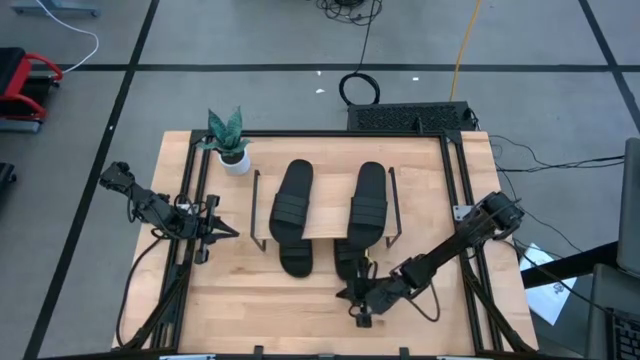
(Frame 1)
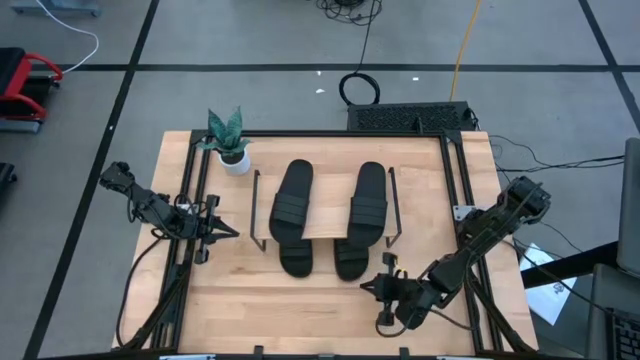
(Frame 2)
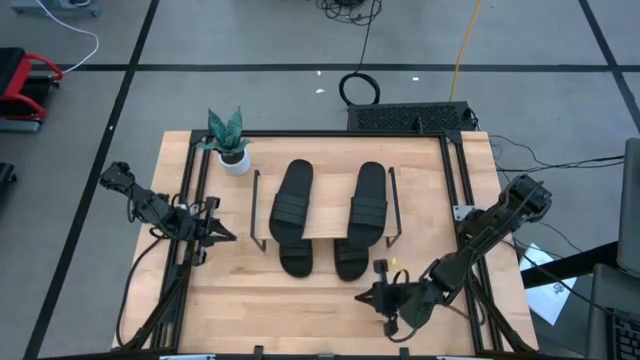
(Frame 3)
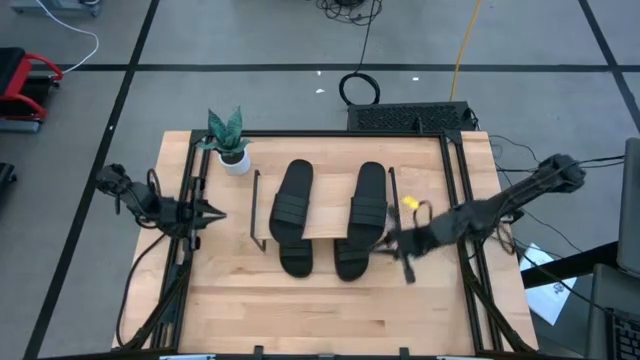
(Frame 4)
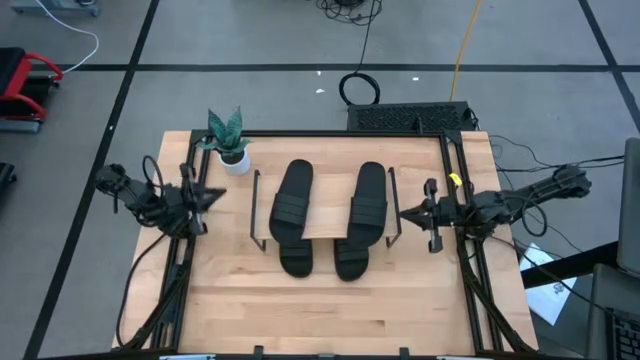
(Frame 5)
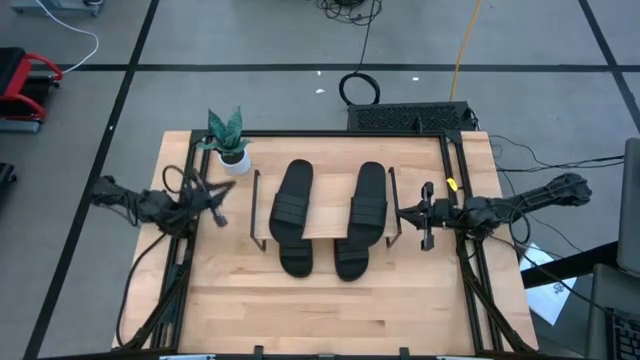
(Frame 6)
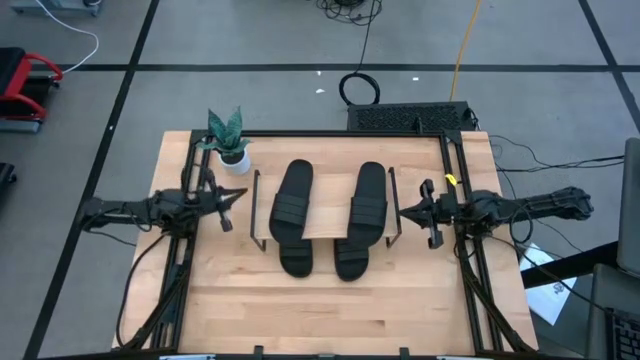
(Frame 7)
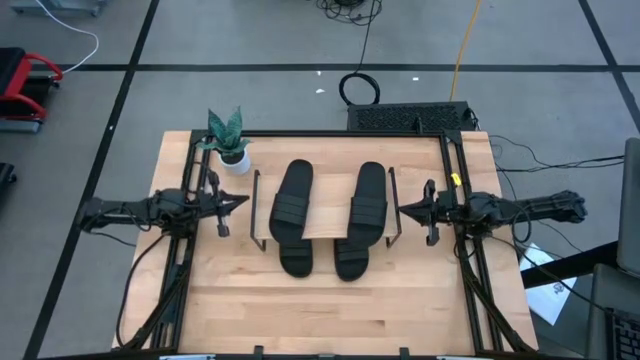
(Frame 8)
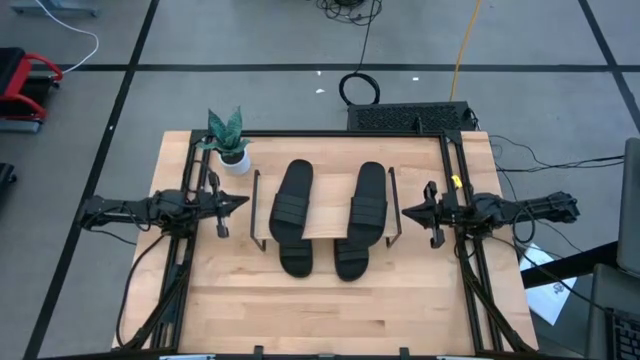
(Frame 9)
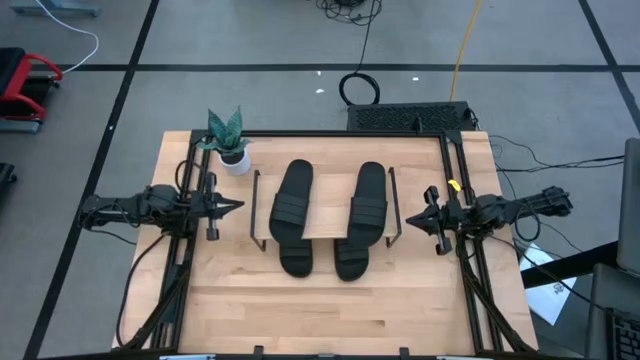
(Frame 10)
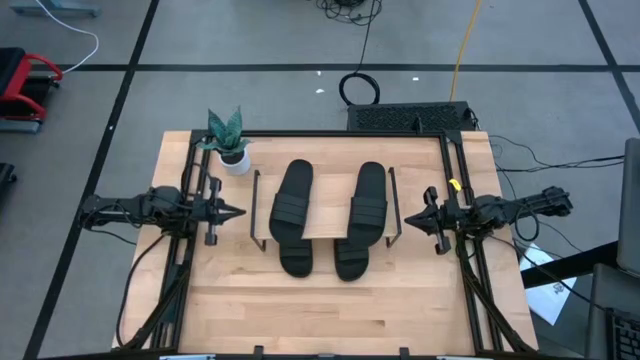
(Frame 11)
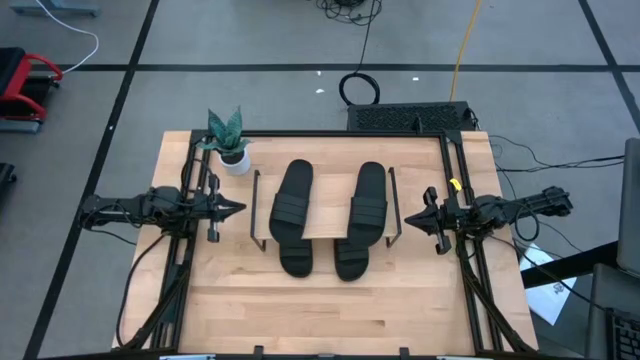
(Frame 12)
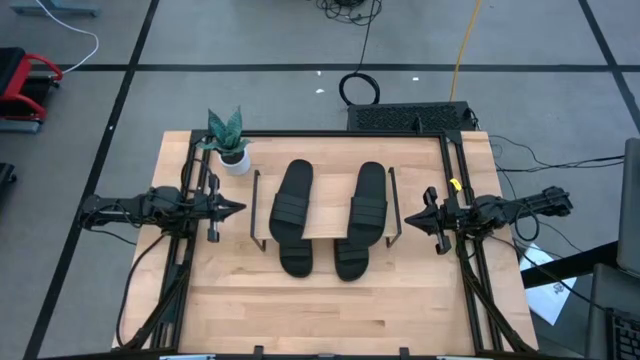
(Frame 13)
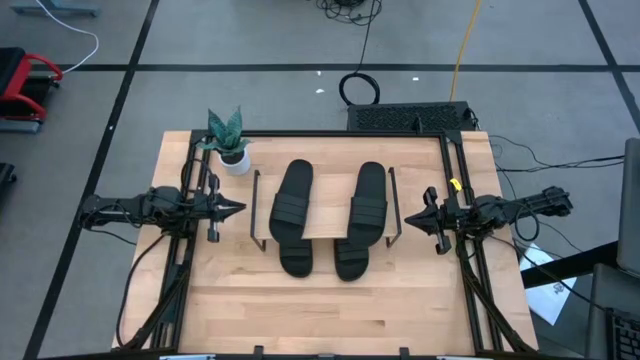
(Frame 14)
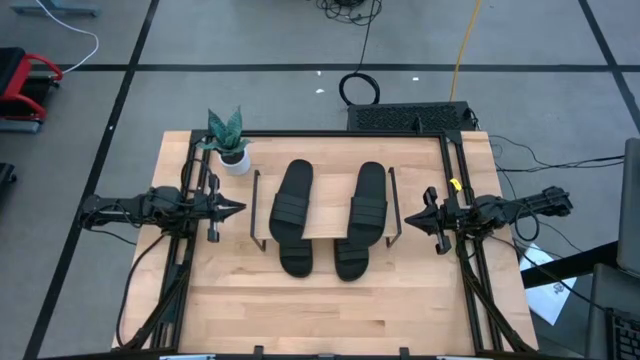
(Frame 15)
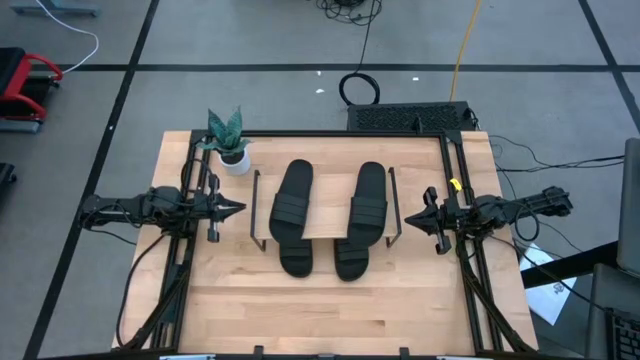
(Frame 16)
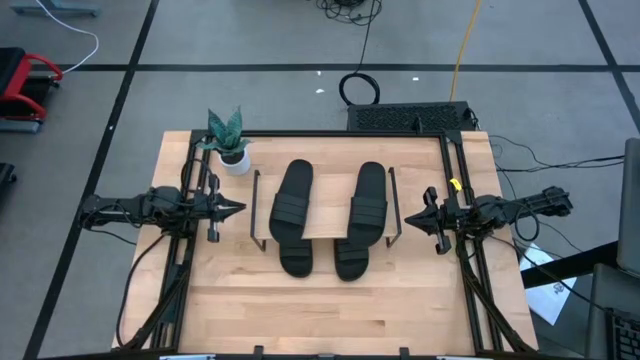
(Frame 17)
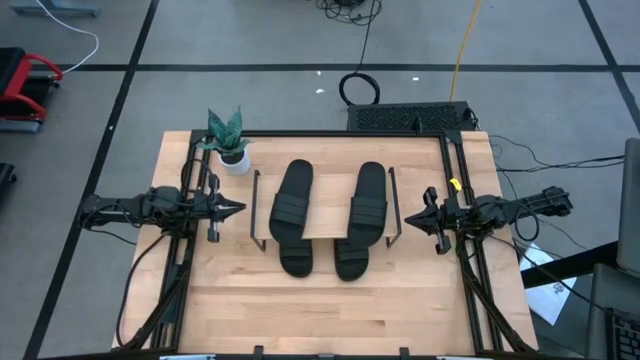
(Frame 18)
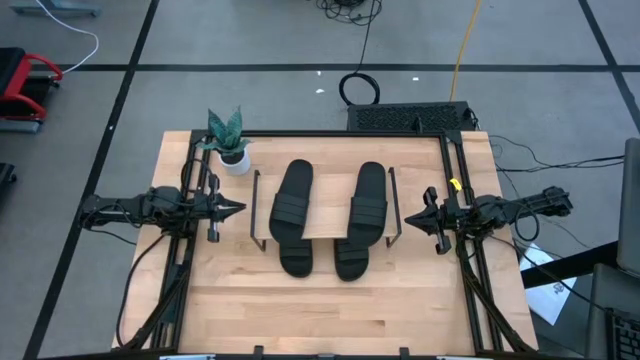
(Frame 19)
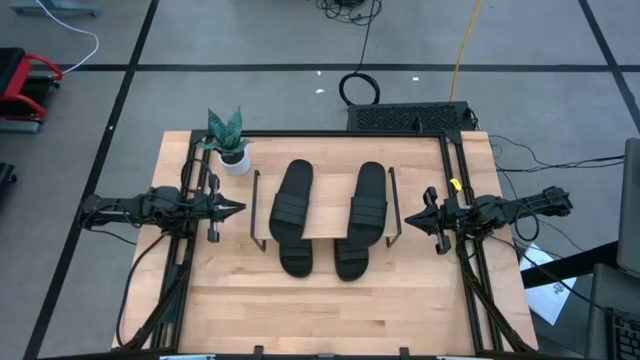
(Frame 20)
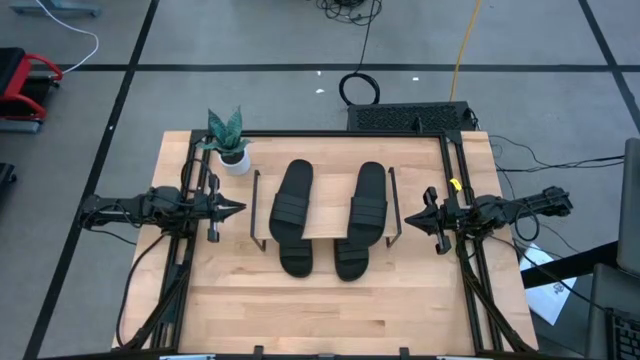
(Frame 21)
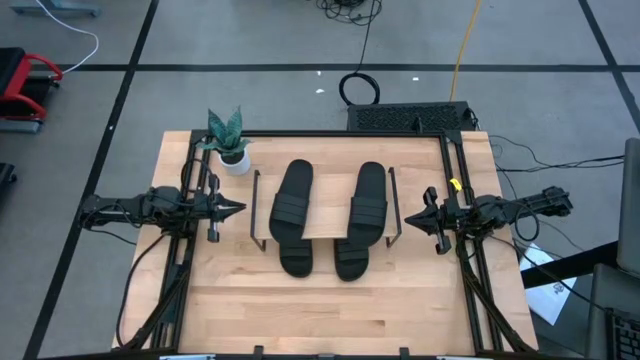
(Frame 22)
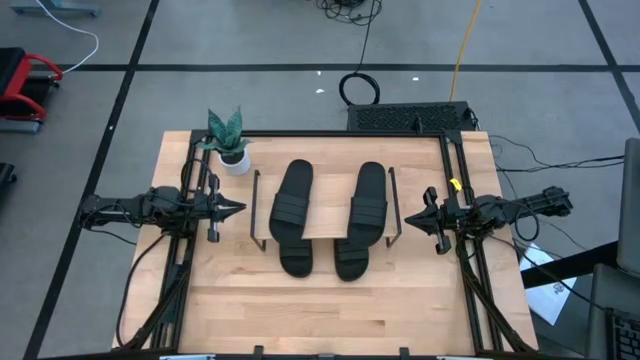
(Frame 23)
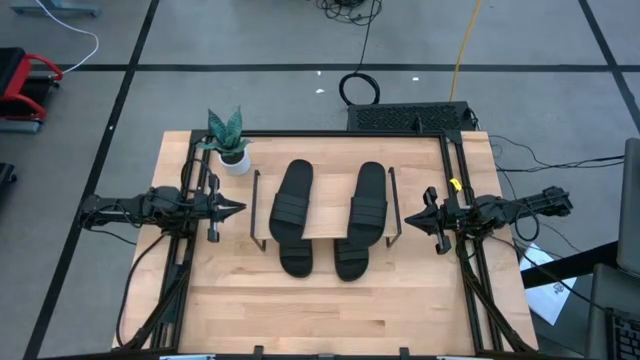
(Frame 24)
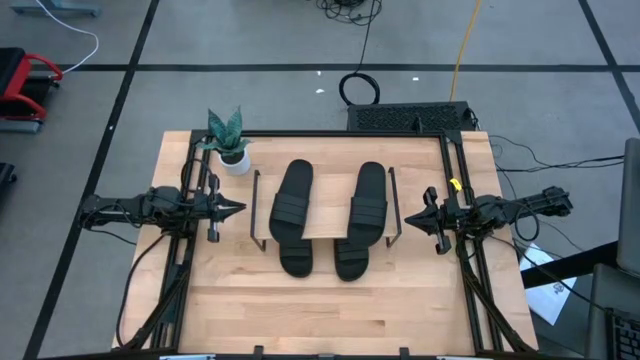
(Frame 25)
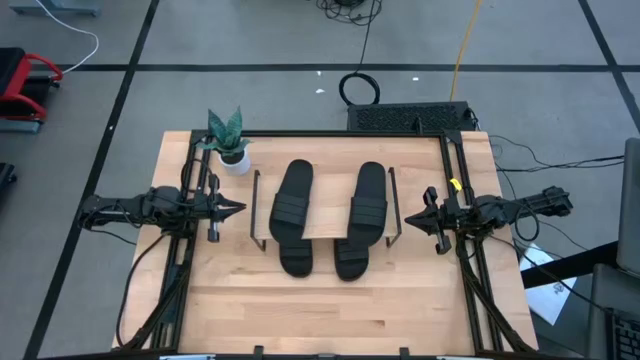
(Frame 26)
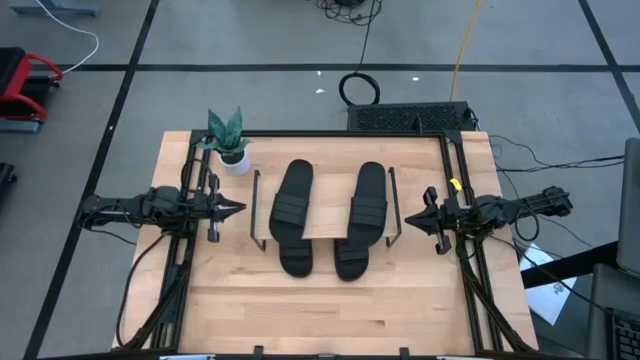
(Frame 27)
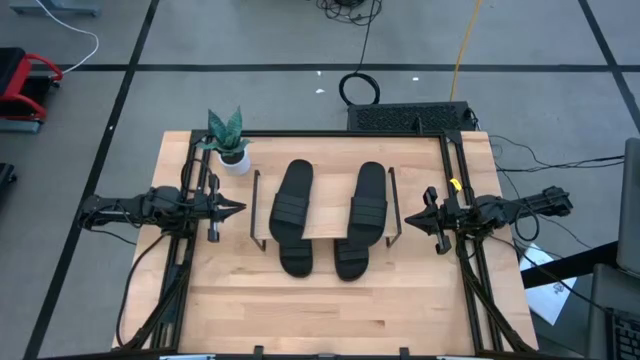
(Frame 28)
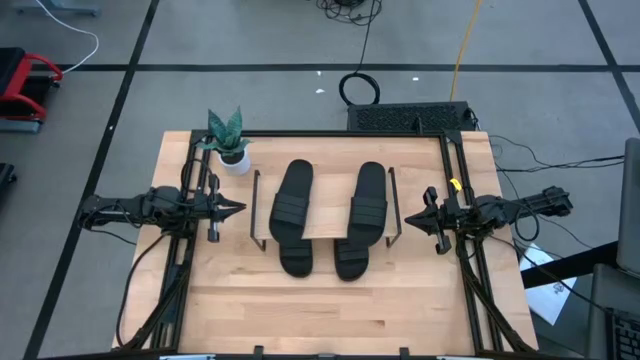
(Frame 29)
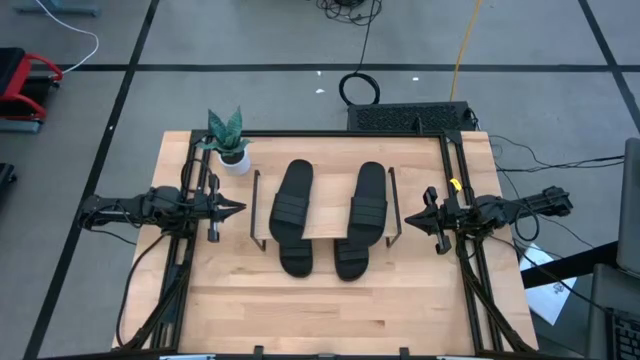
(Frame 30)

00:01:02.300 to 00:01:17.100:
Task: Pick and place slides into the shelf
Return to Home Position
